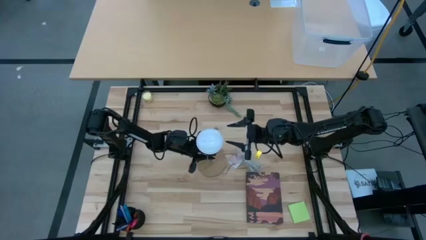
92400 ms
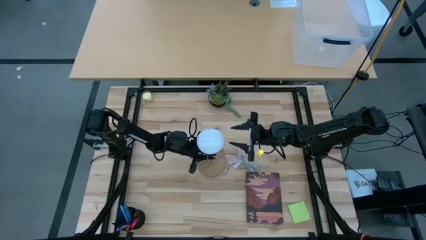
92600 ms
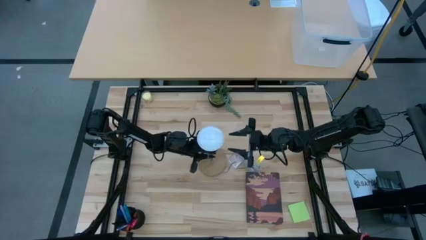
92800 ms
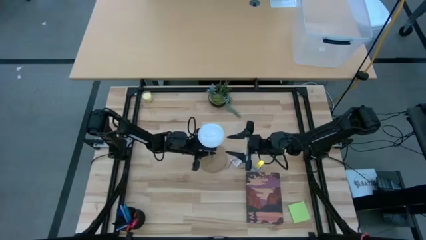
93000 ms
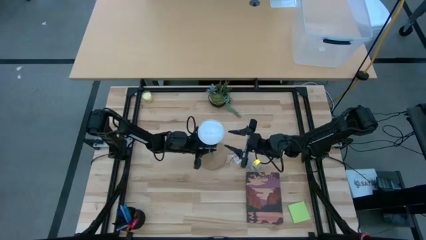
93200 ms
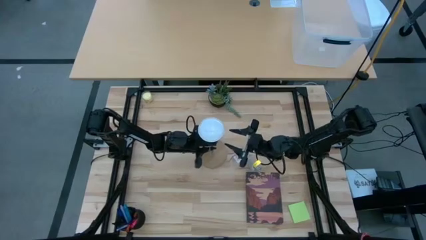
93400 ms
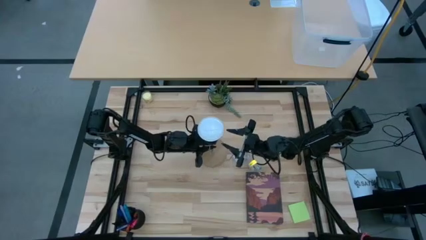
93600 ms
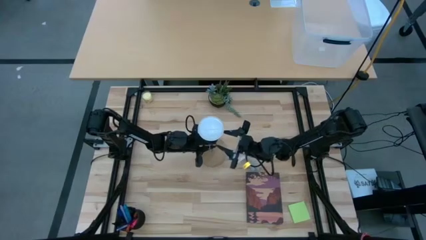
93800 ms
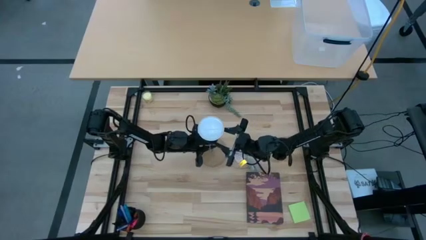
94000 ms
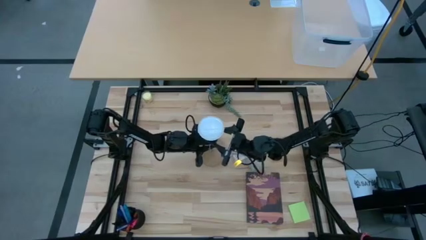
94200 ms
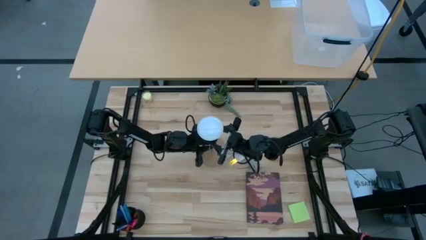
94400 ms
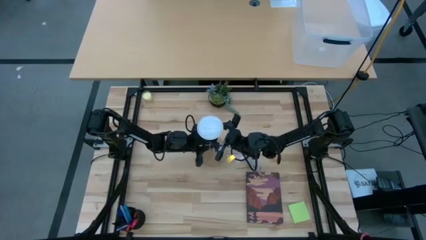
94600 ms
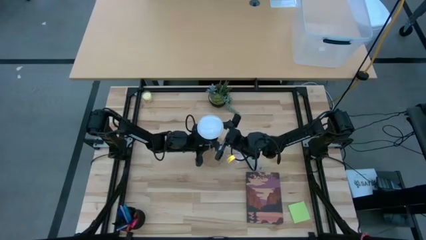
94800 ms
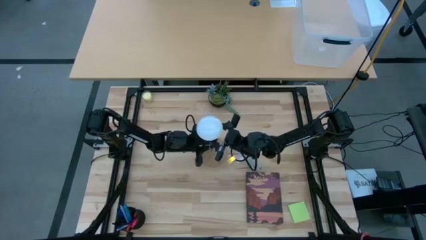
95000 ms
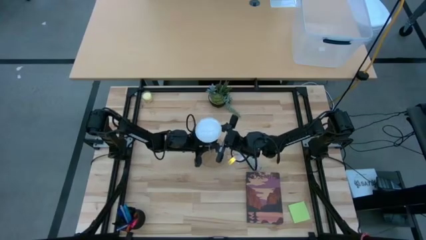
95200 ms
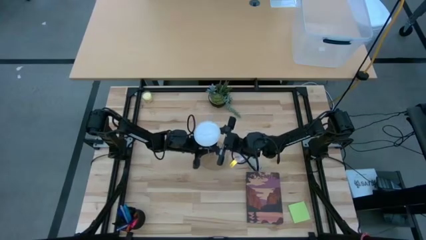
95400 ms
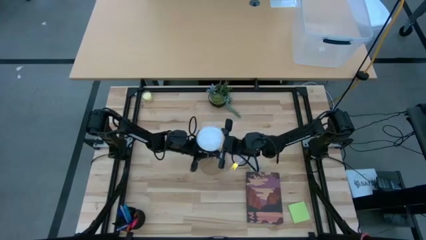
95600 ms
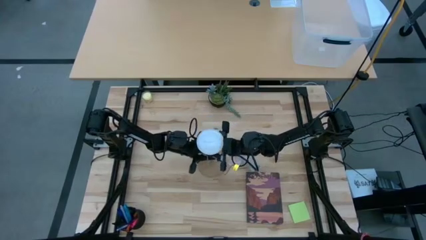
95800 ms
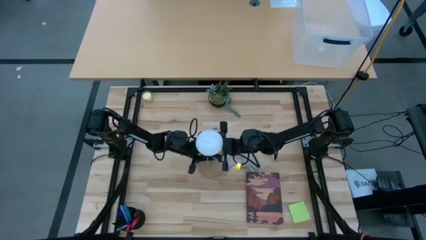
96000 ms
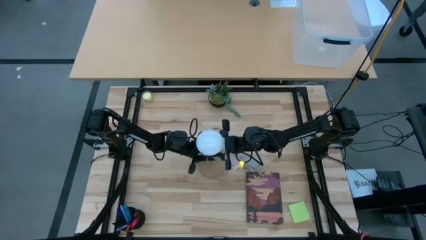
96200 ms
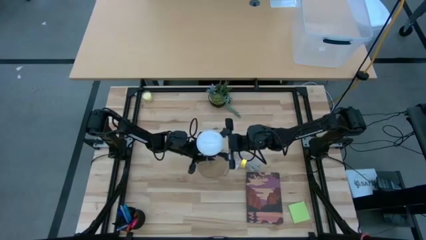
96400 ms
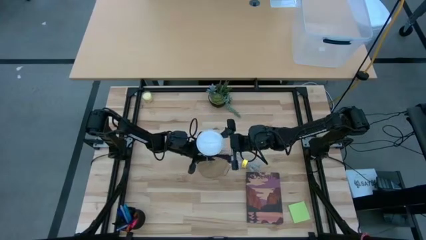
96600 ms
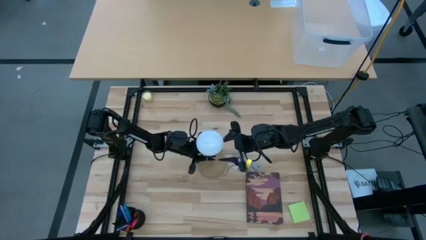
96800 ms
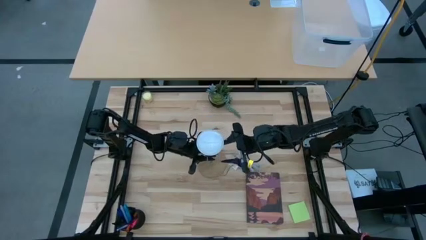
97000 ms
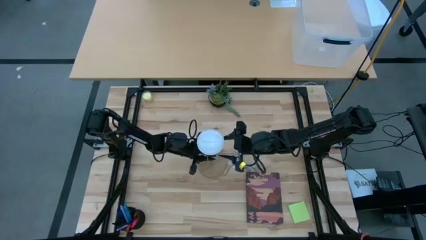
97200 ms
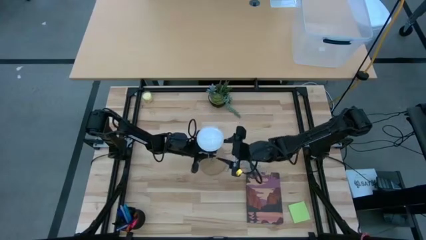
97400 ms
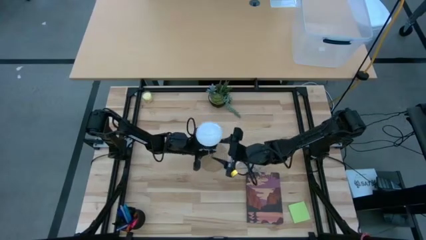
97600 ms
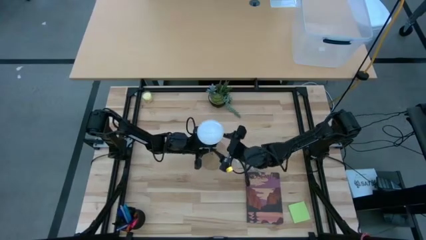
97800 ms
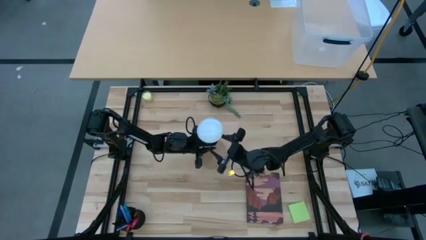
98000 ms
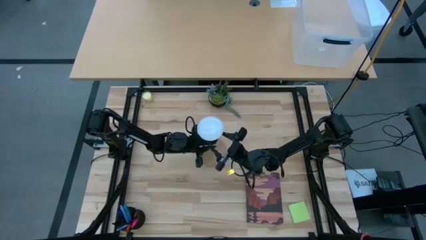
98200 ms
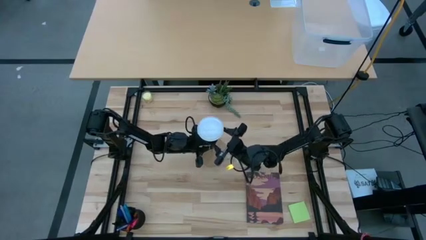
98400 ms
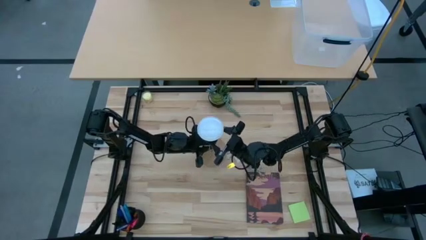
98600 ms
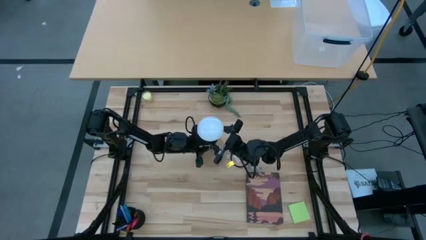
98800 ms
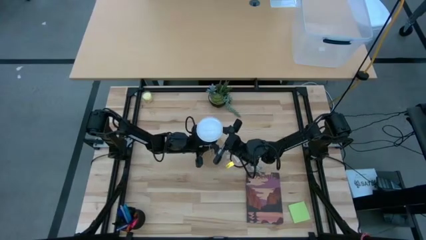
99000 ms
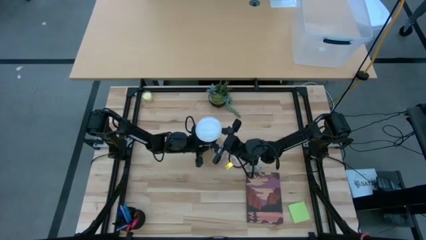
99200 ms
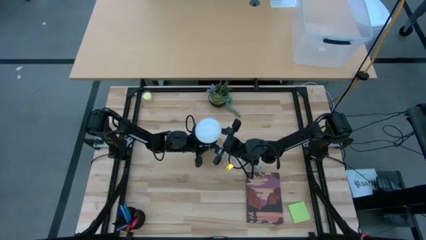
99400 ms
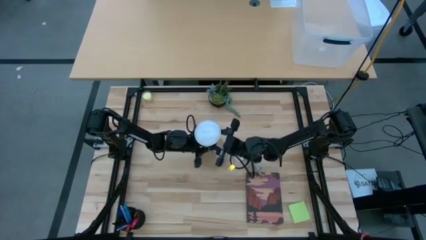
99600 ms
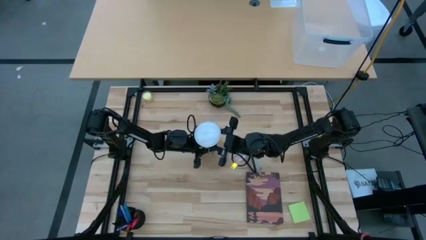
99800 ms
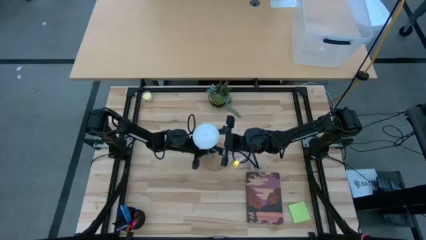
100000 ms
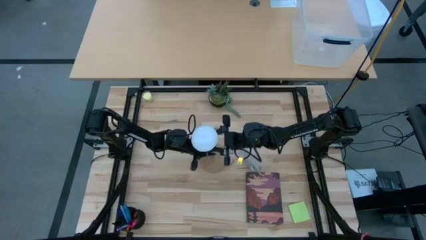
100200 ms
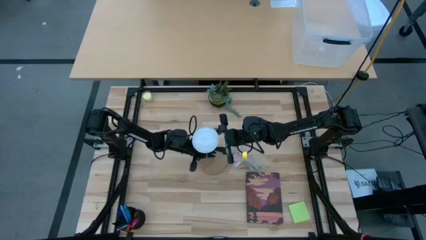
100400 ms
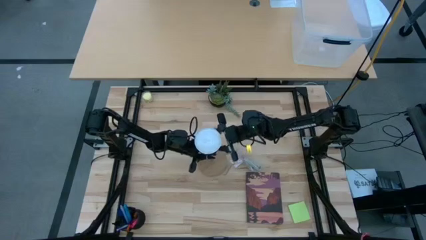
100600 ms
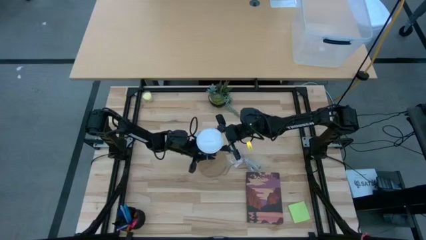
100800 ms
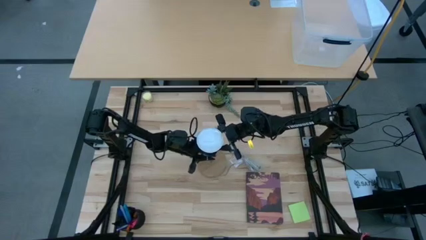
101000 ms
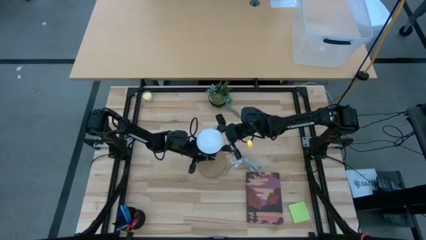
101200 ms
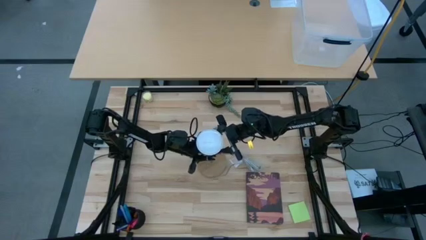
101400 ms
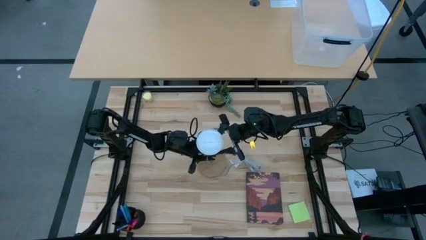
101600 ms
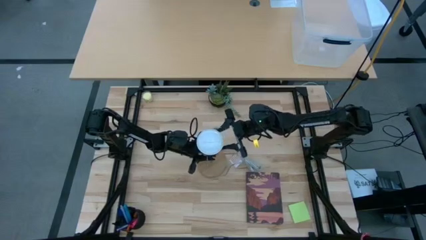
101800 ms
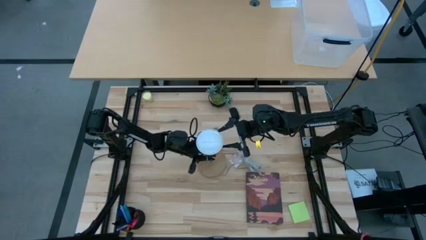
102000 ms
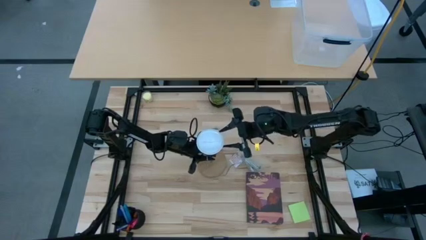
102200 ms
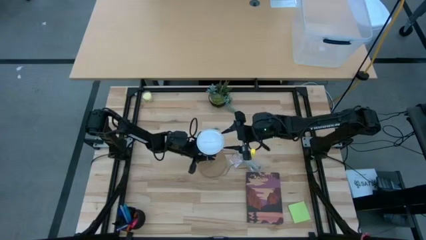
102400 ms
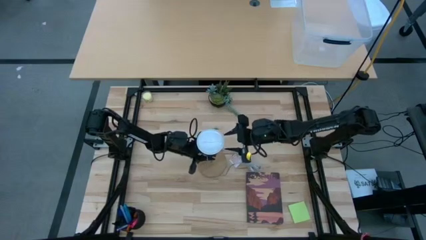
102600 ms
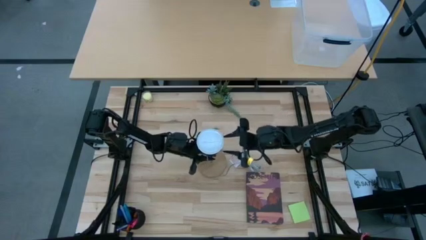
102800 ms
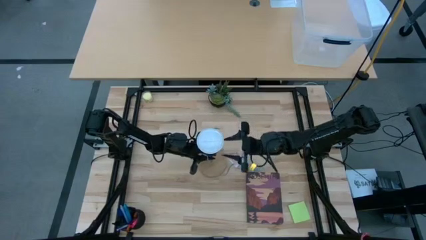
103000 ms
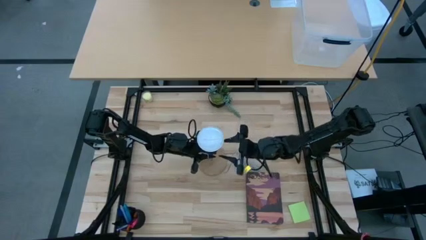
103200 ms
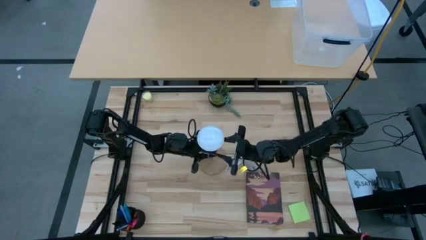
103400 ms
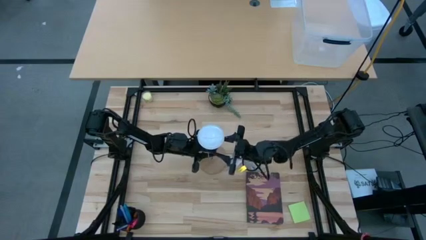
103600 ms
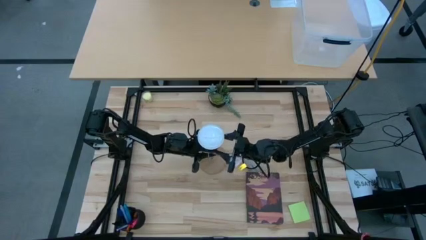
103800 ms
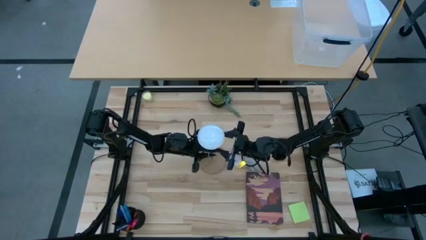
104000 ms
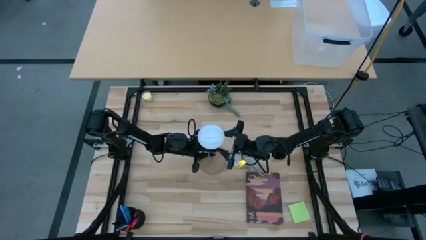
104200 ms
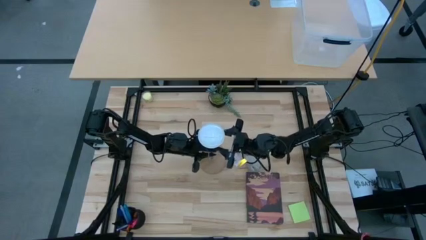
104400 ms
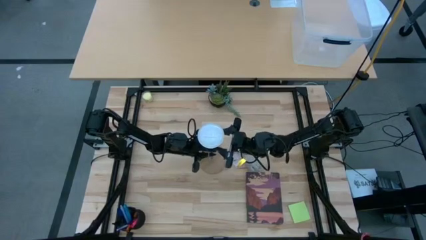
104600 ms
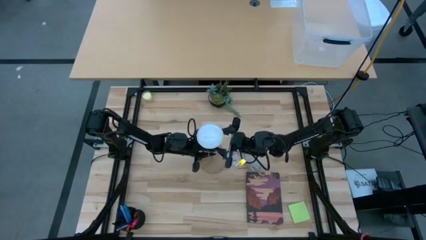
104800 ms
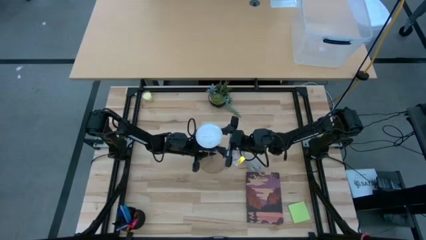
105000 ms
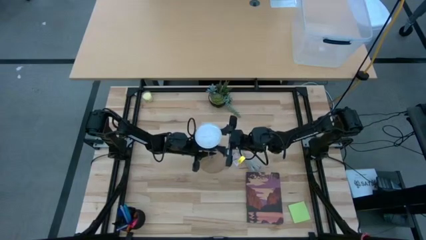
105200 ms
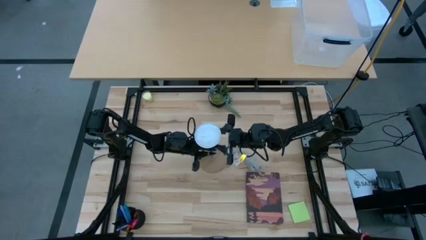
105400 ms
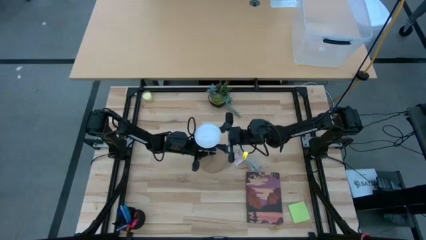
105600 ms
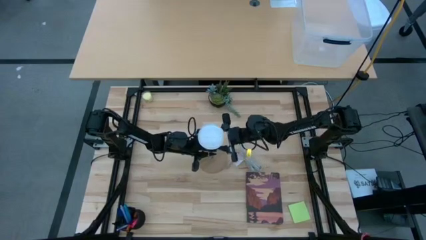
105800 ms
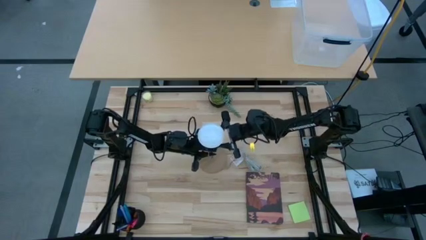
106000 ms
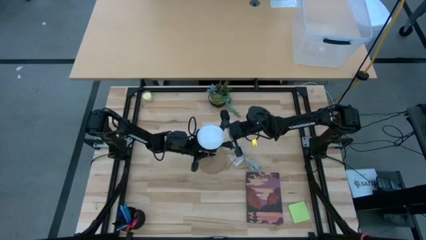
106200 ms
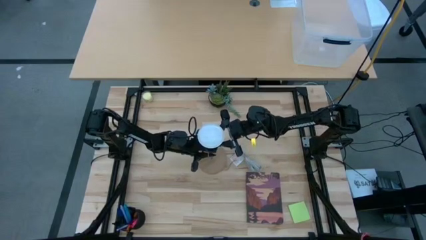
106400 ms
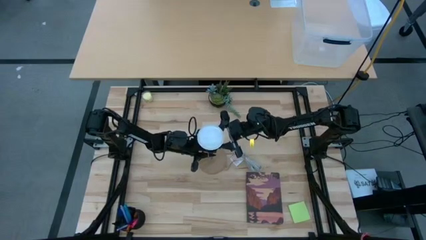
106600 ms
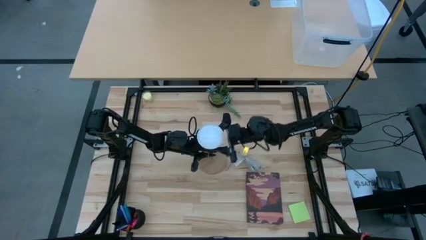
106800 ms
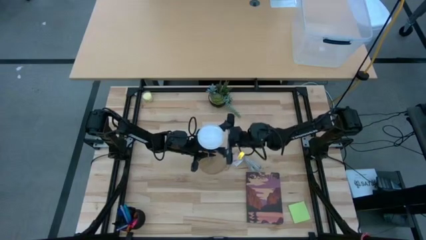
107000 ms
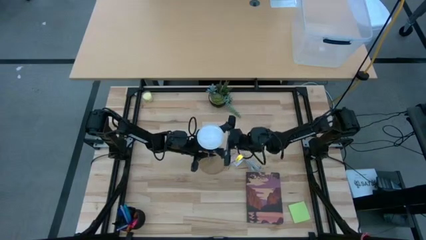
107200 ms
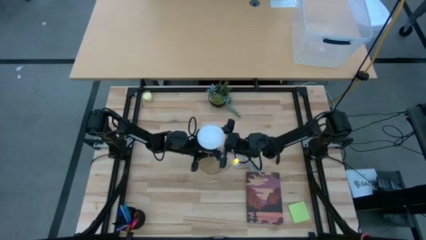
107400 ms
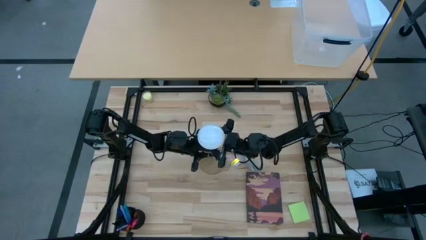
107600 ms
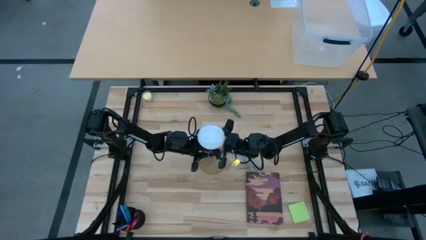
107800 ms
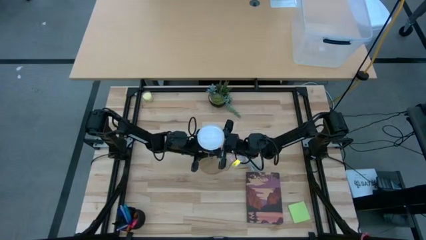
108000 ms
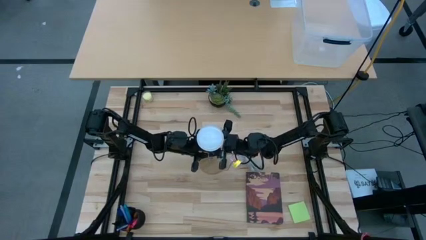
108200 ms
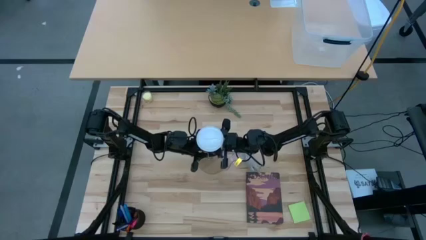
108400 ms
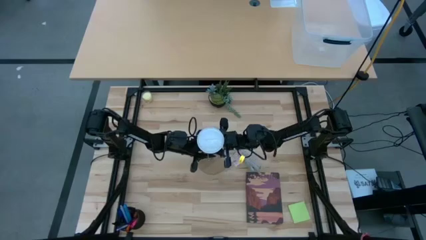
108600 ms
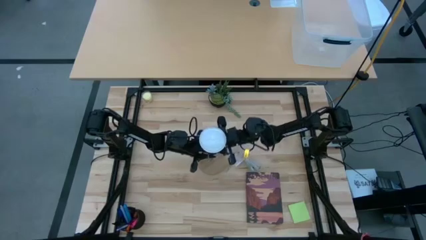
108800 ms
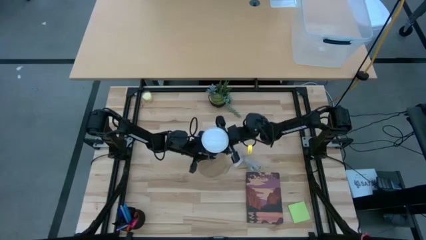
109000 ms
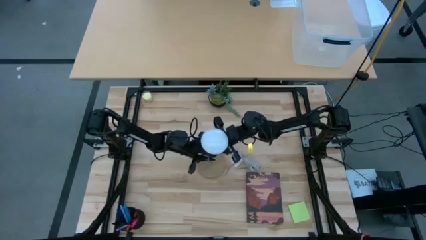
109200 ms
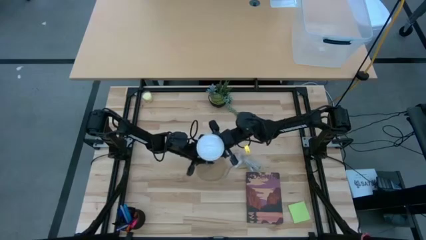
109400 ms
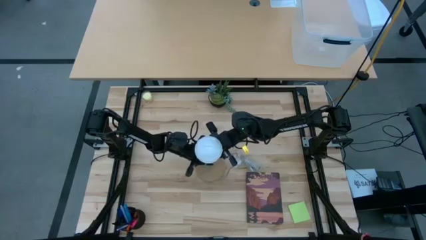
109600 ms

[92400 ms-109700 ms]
Task: Screw lightbulb
Remove the white lightbulb from the silver lamp
